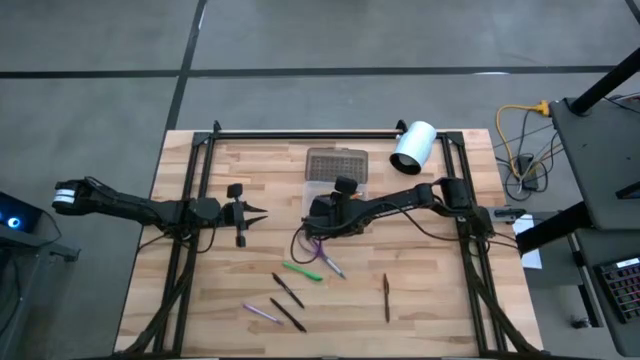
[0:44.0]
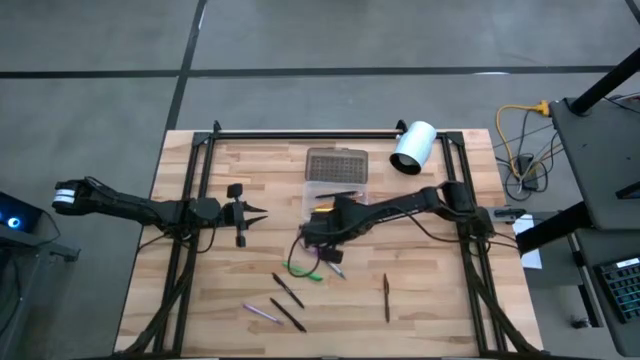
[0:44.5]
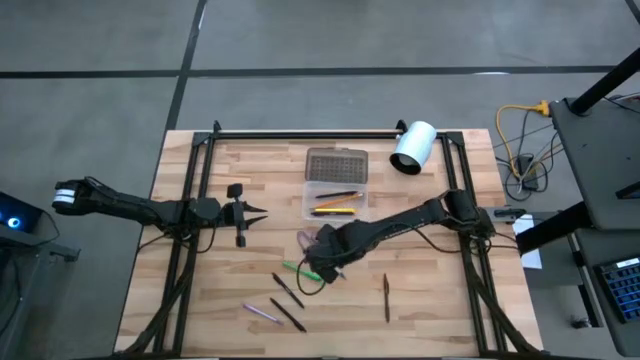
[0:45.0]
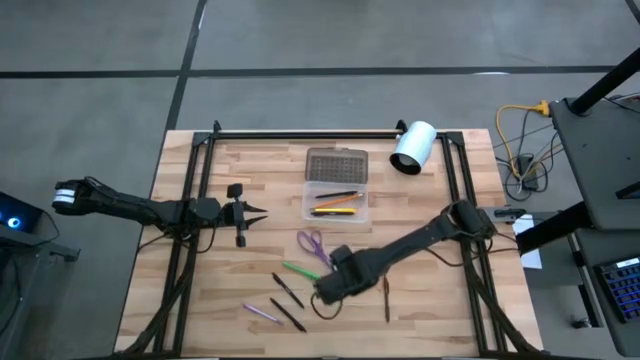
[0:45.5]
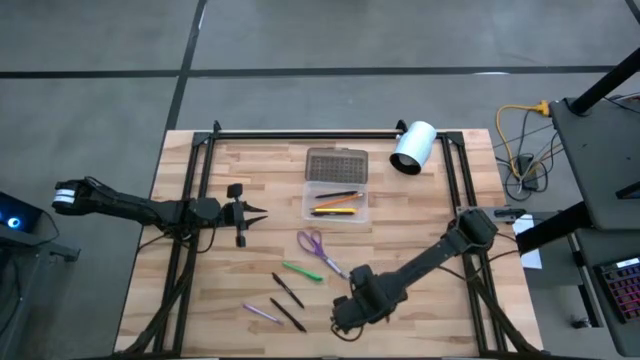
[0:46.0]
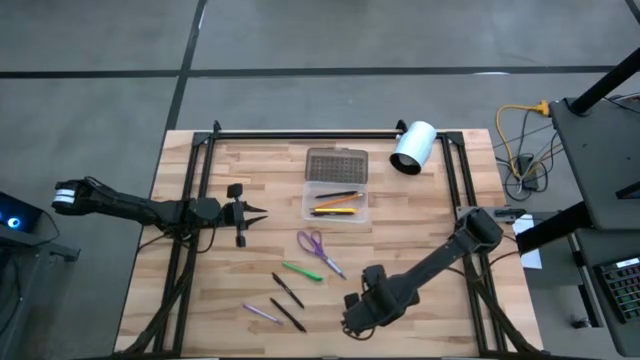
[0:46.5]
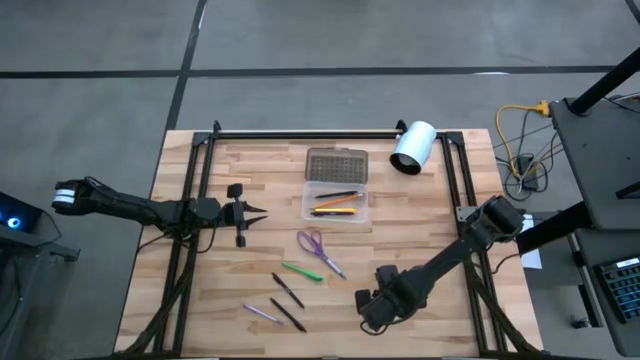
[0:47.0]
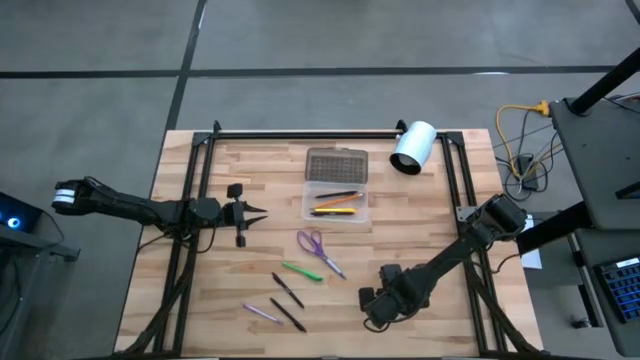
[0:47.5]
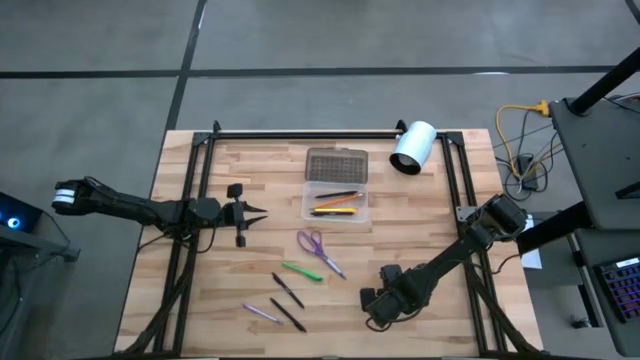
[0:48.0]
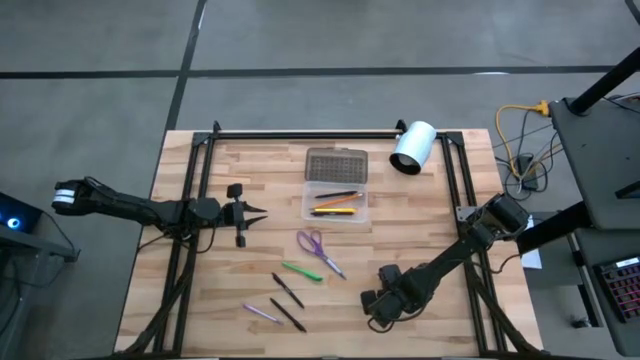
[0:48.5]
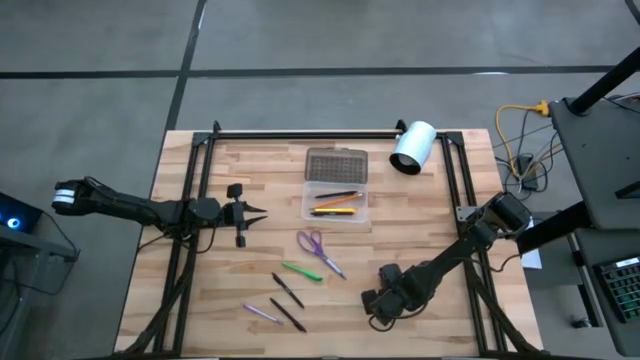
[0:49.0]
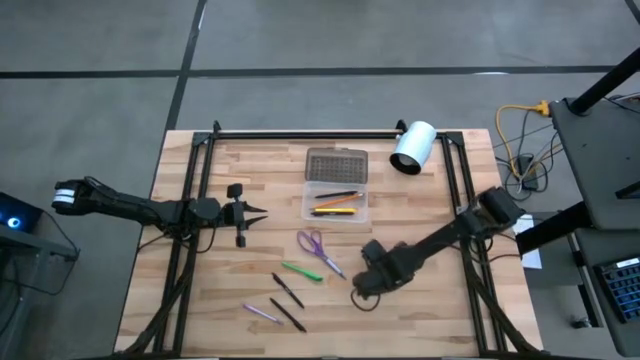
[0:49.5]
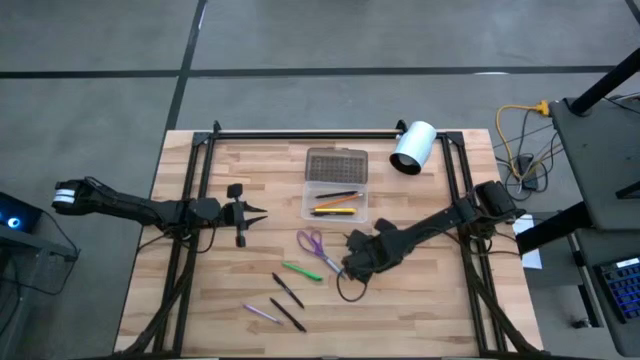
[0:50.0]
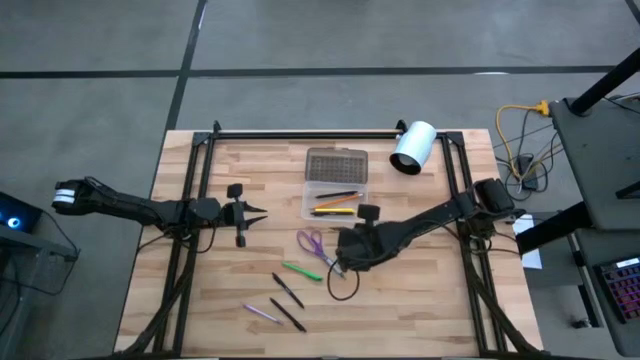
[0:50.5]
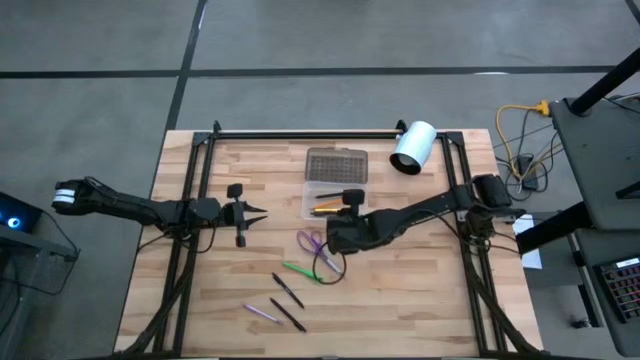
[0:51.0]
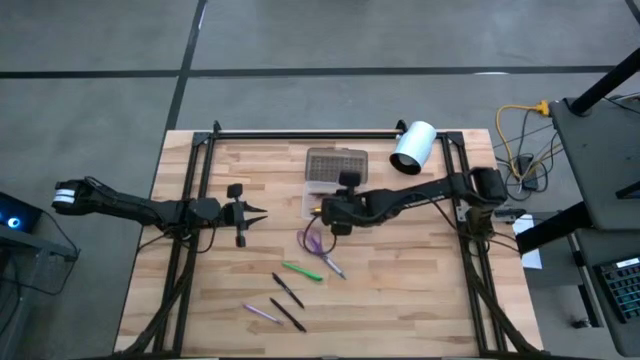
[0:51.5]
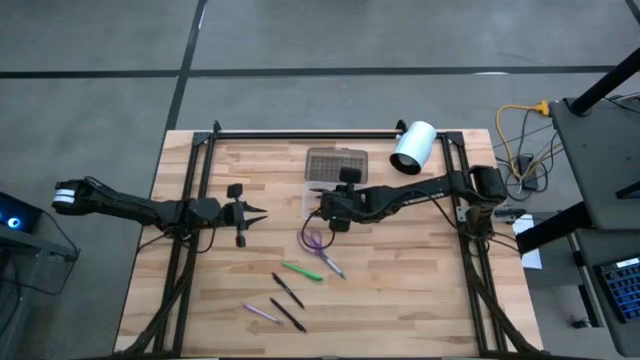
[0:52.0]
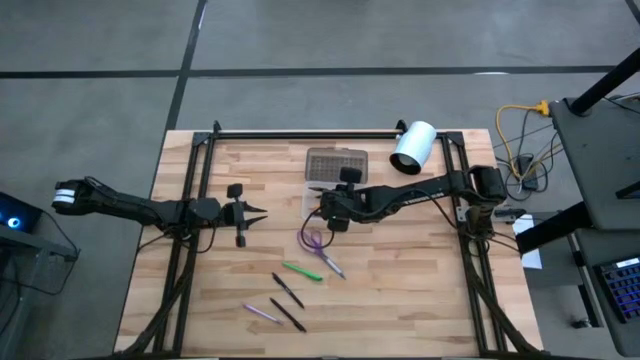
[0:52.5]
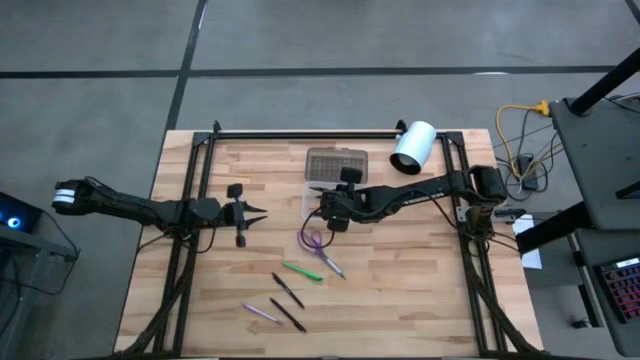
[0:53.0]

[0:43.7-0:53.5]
Task: Pick & place school supplies into a supply box
Put the brown pen into the transparent bin

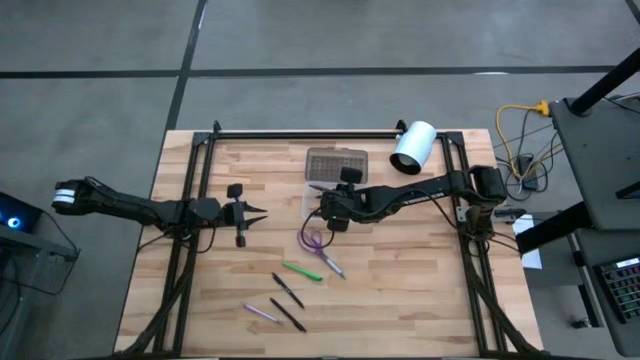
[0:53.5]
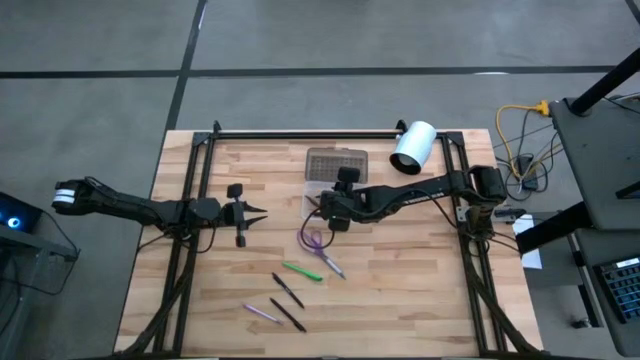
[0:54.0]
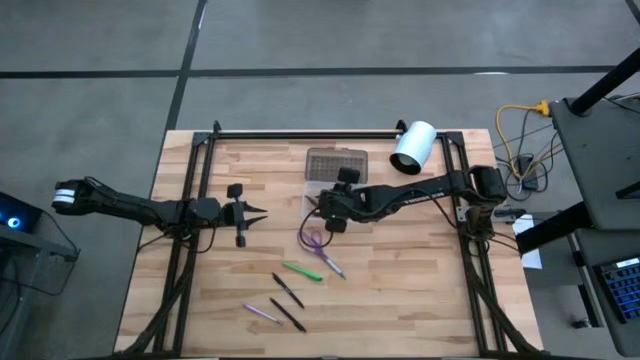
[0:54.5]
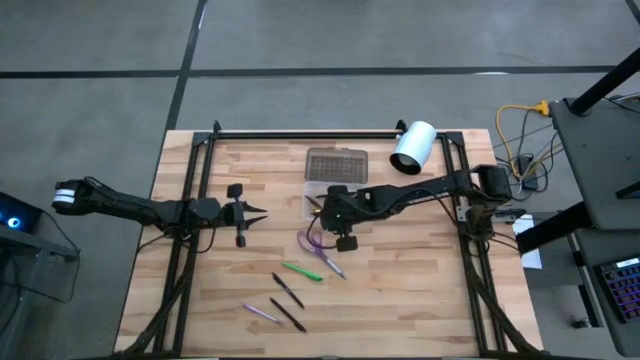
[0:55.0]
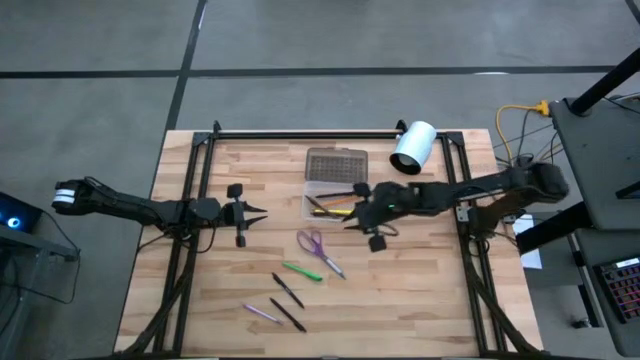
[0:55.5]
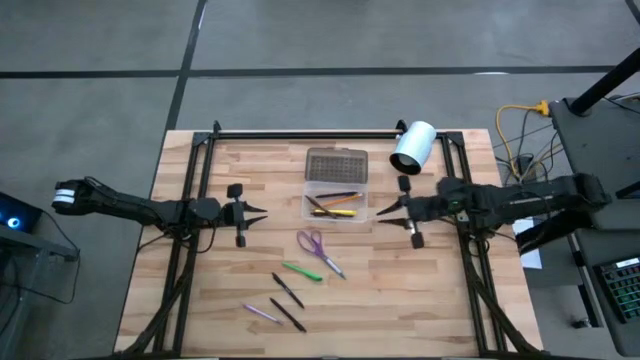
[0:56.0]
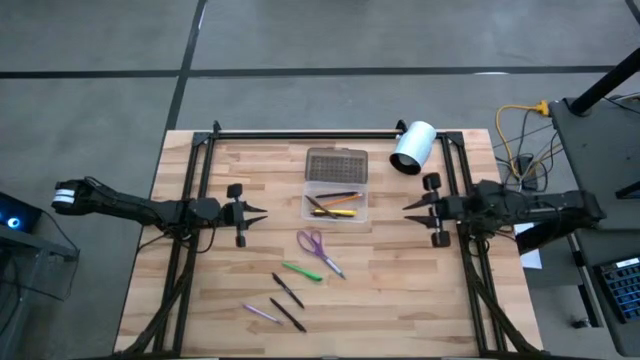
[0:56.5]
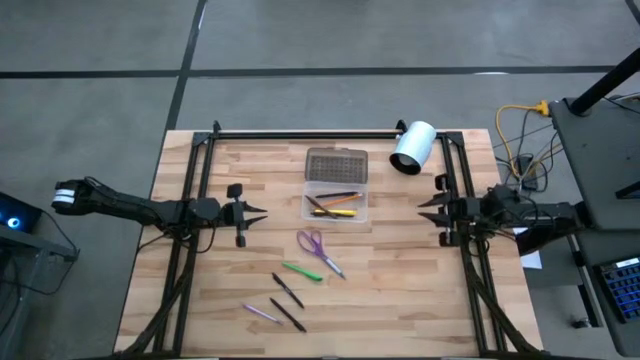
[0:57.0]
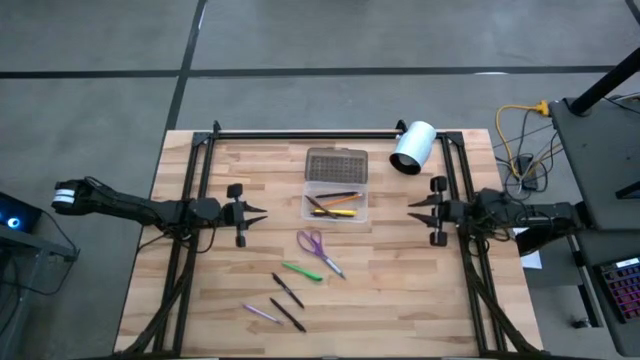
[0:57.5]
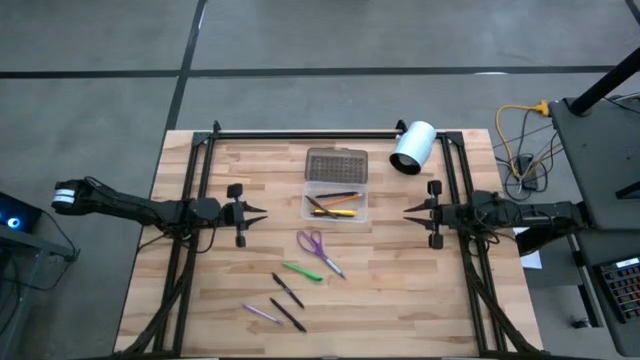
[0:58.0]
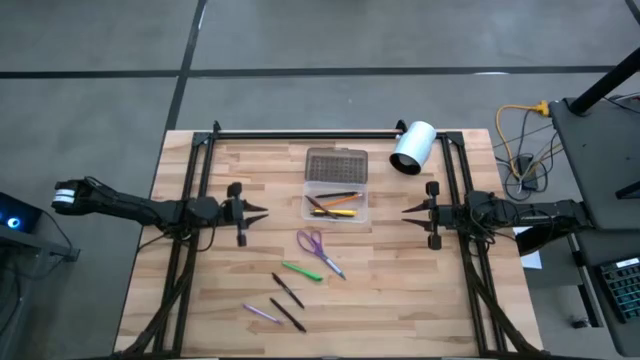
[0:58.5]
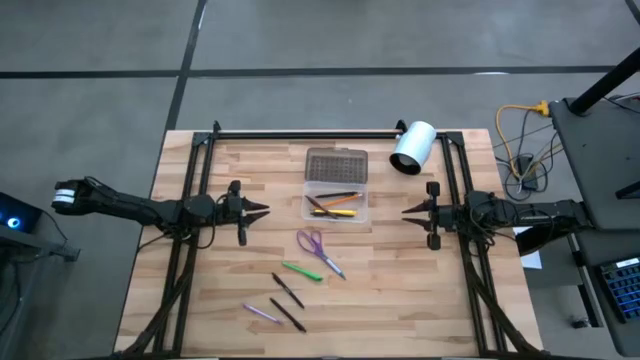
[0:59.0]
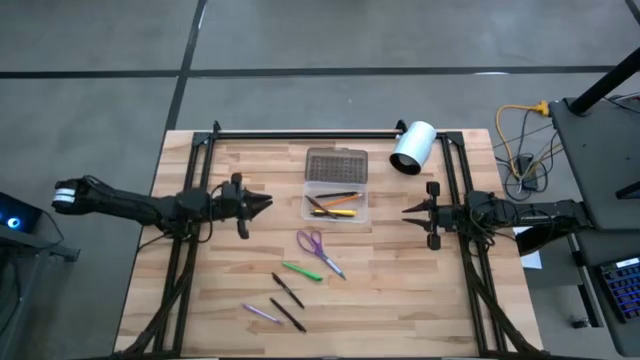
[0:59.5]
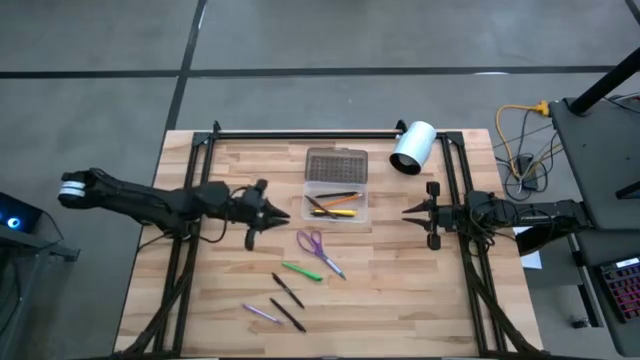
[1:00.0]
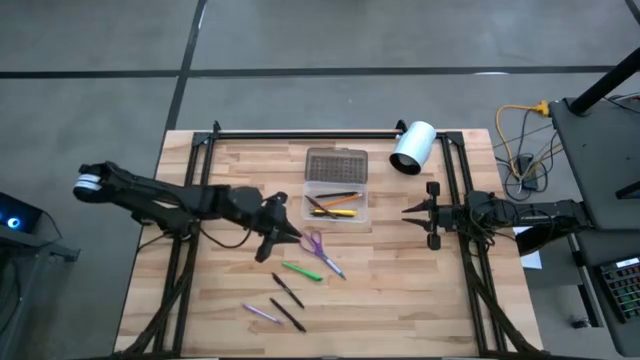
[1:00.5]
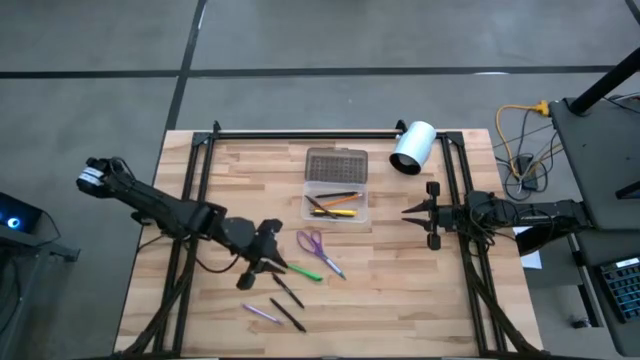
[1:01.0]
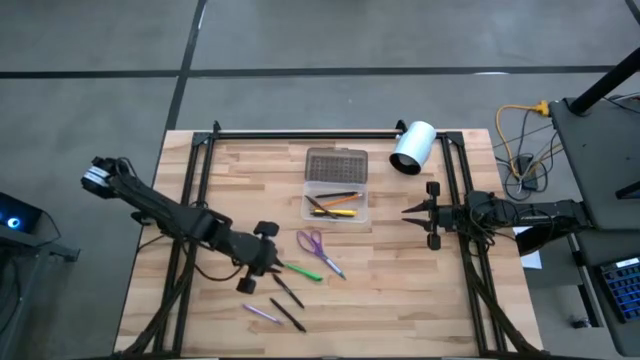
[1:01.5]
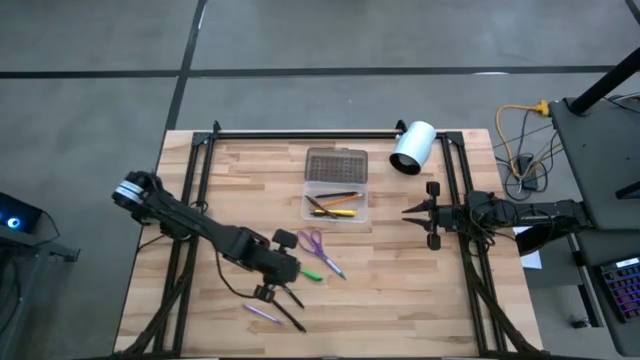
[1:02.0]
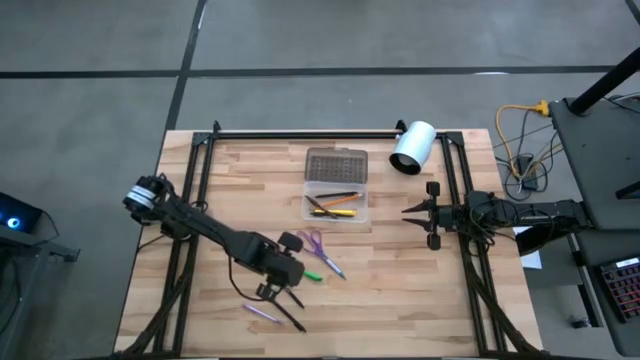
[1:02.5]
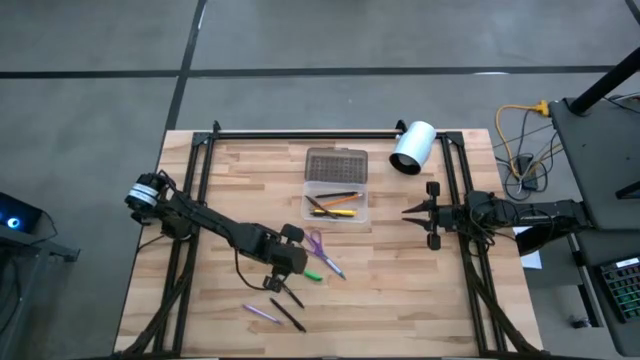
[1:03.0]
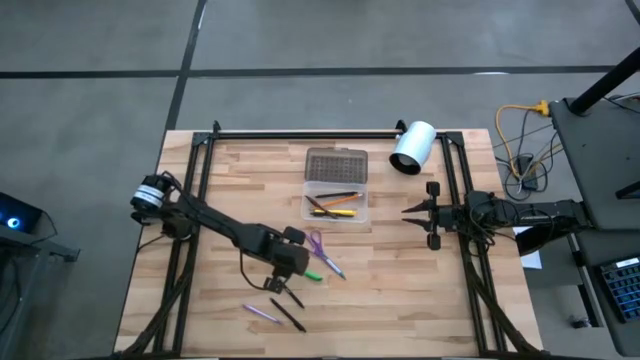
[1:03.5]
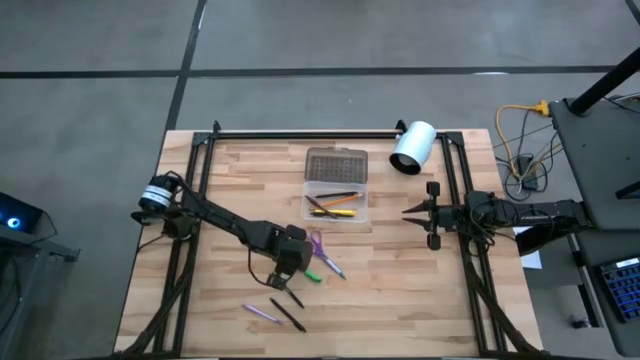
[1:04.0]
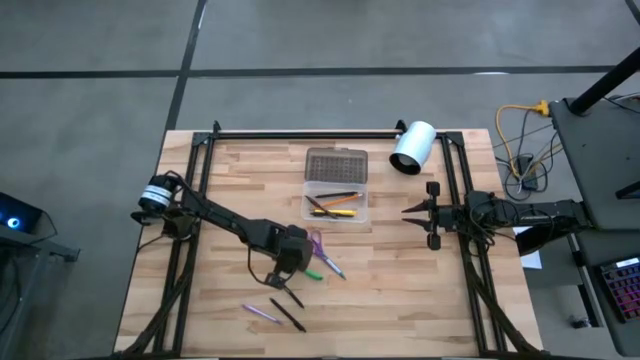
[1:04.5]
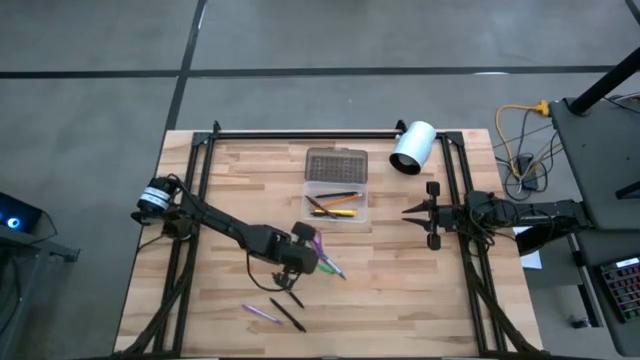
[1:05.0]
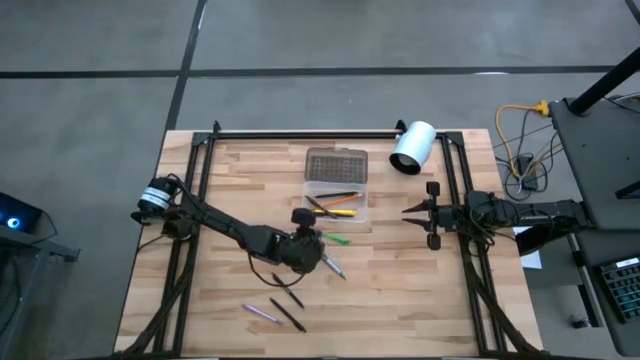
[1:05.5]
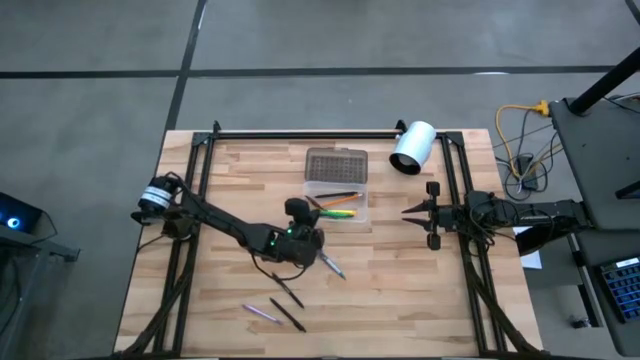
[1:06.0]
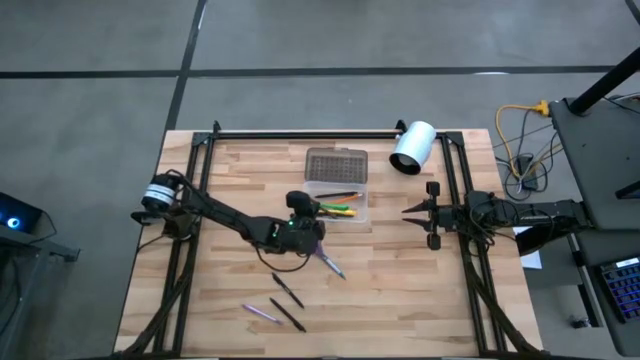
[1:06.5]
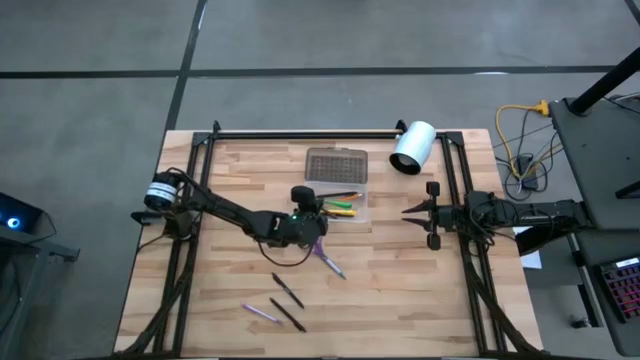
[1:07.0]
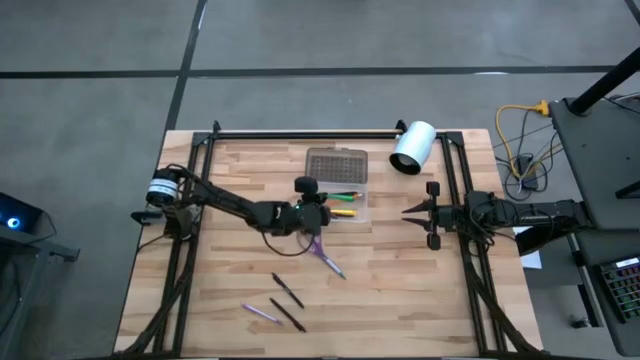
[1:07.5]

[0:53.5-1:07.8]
Put the green pen into the transparent bin
